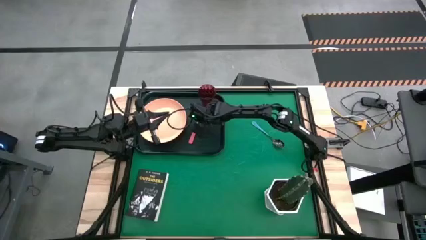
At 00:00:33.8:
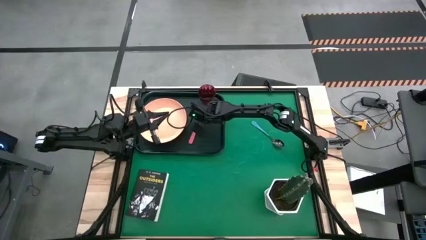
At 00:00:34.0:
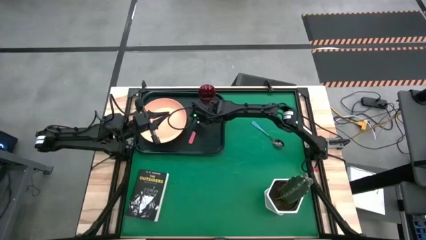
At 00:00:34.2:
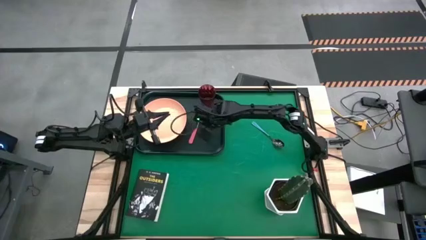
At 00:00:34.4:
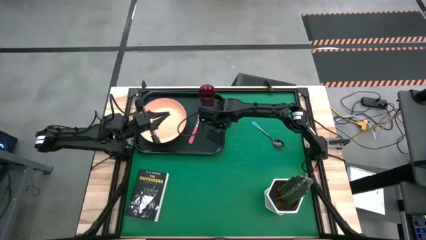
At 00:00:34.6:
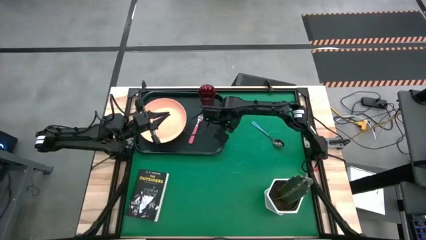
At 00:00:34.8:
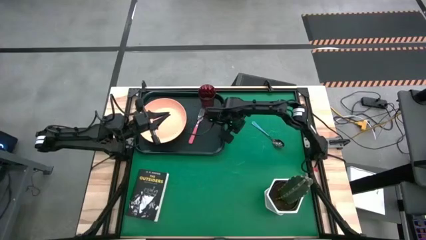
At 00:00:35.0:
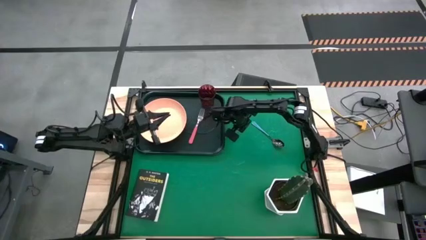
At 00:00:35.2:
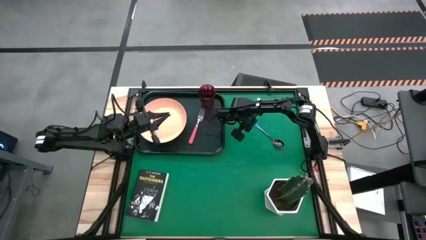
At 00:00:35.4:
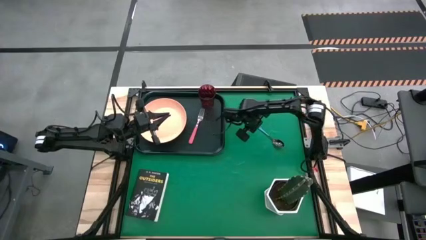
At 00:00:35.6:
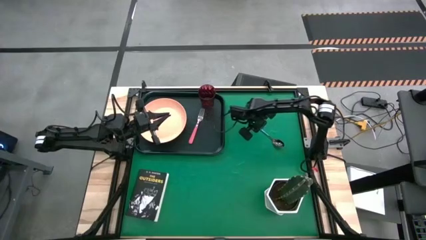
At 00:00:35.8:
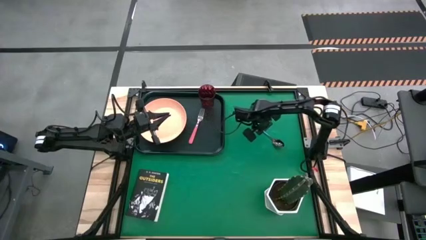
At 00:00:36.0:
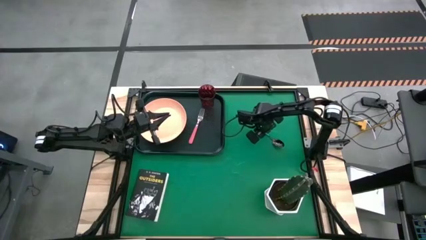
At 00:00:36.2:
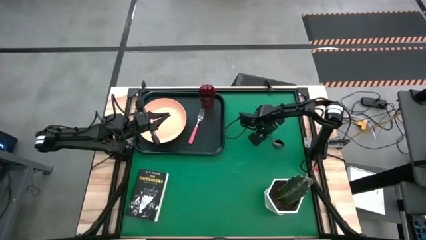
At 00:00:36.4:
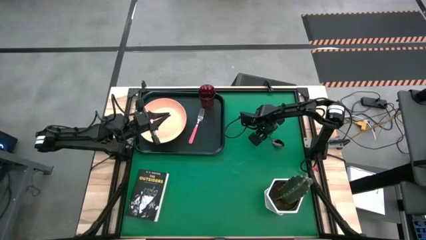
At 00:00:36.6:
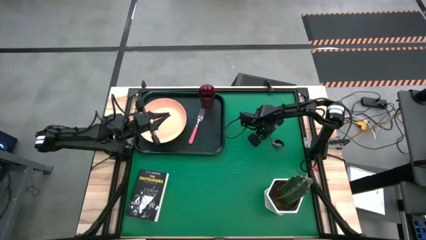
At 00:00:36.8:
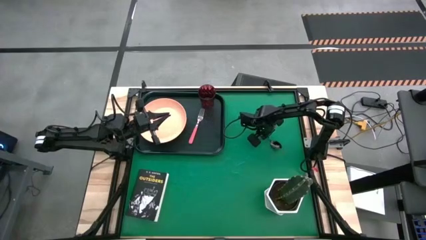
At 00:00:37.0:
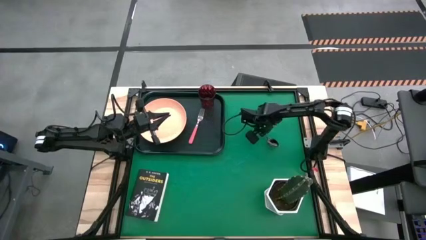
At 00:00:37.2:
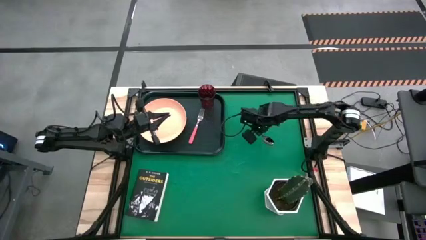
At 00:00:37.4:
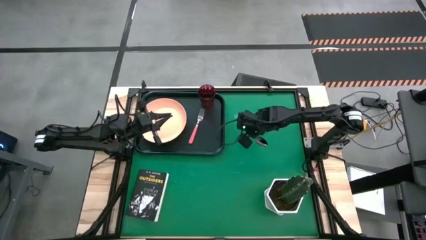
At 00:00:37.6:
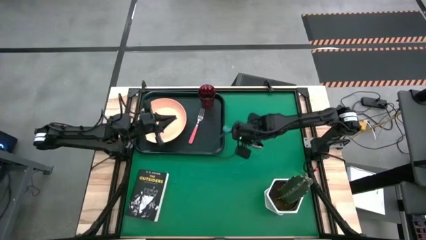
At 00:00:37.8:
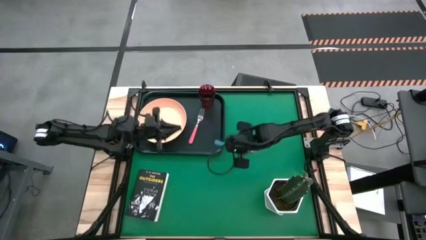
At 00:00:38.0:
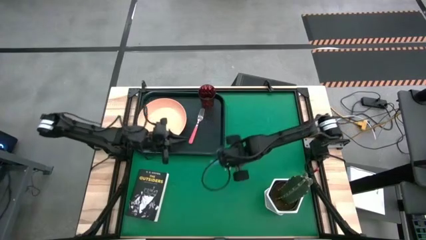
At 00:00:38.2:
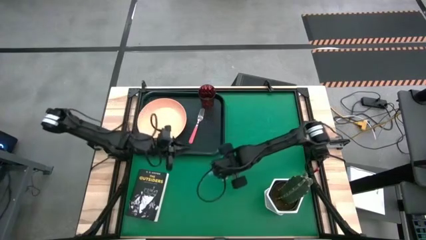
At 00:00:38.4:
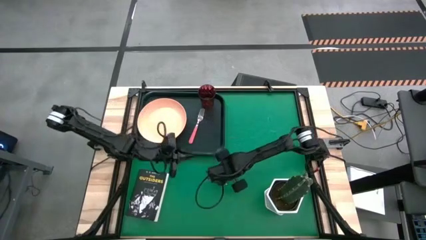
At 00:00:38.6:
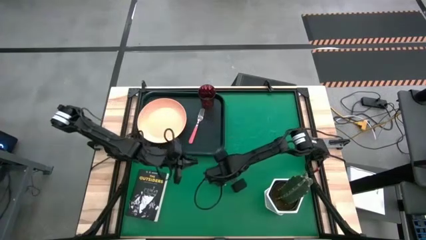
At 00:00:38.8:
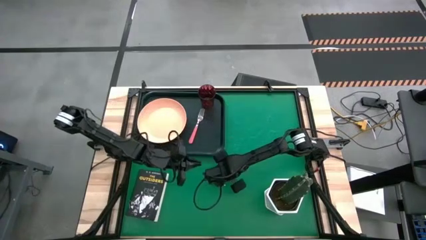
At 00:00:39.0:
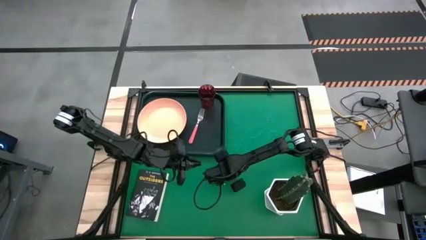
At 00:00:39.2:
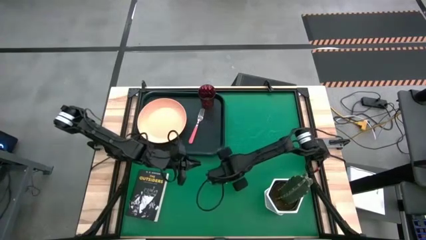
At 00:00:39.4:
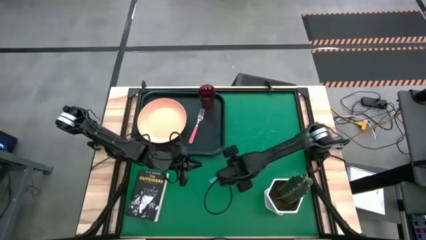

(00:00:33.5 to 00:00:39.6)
Task: Pick and place plate/cup/fork/spoon on tray
Move the blue spoon to the center of the table

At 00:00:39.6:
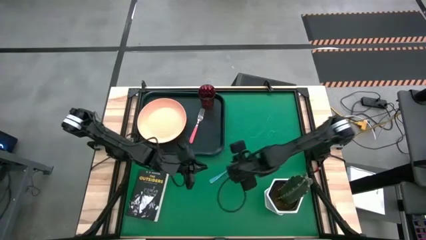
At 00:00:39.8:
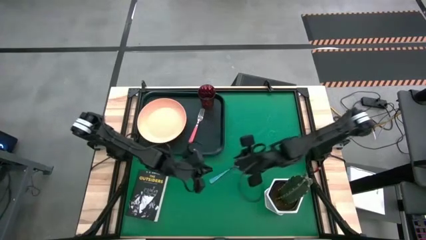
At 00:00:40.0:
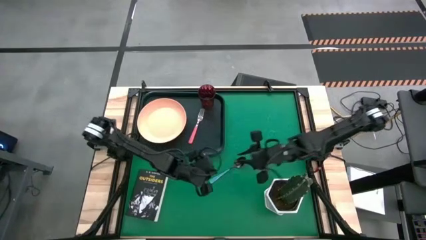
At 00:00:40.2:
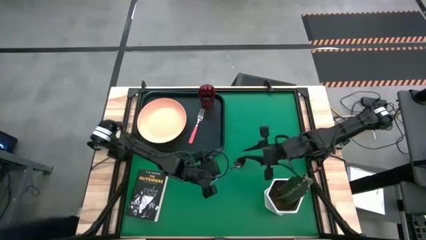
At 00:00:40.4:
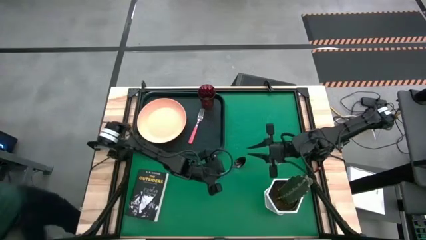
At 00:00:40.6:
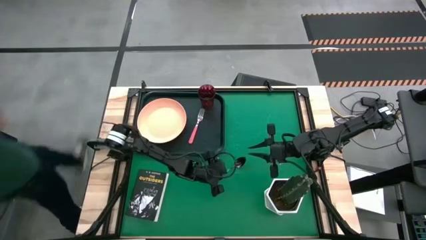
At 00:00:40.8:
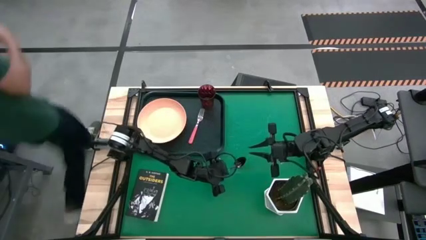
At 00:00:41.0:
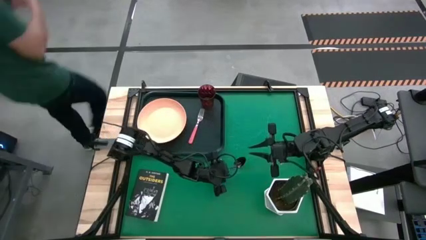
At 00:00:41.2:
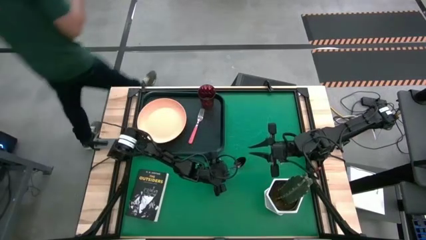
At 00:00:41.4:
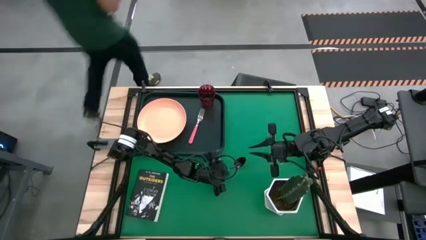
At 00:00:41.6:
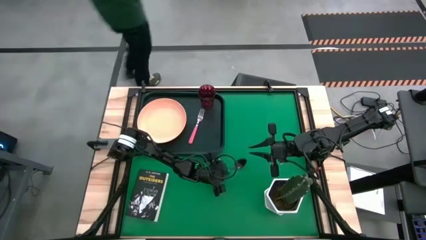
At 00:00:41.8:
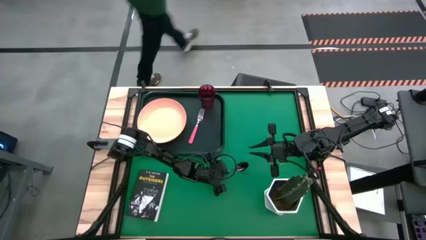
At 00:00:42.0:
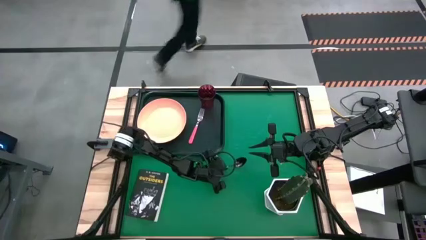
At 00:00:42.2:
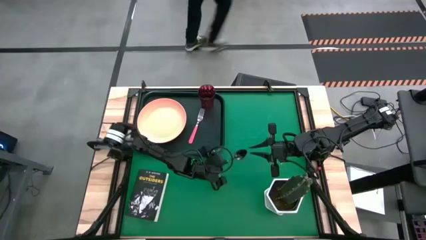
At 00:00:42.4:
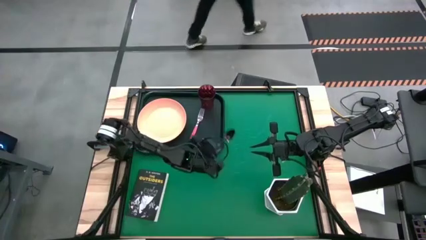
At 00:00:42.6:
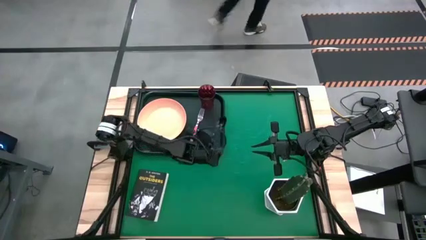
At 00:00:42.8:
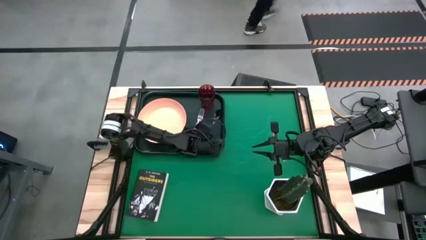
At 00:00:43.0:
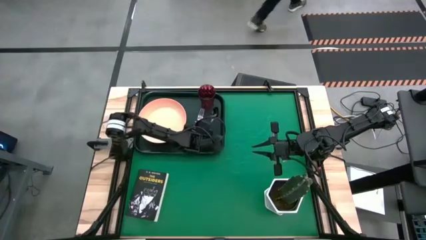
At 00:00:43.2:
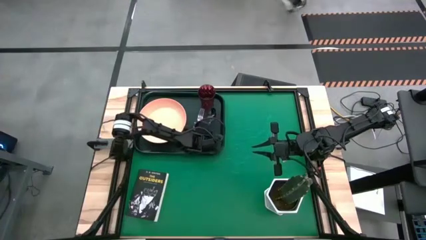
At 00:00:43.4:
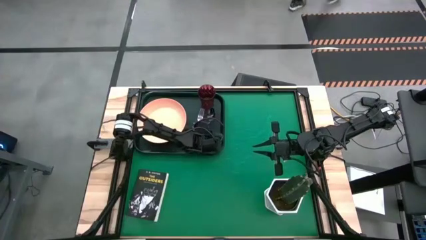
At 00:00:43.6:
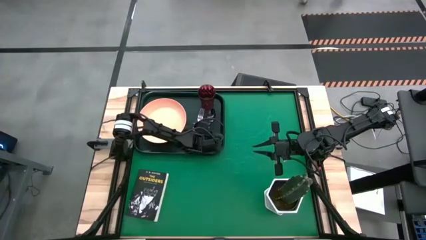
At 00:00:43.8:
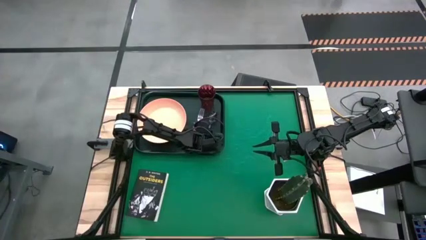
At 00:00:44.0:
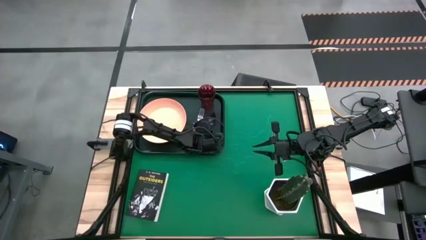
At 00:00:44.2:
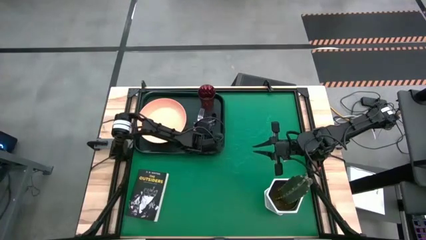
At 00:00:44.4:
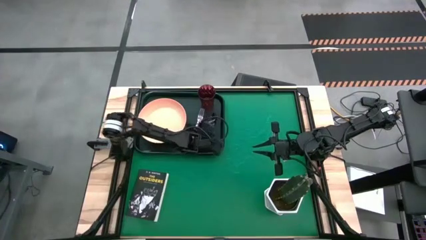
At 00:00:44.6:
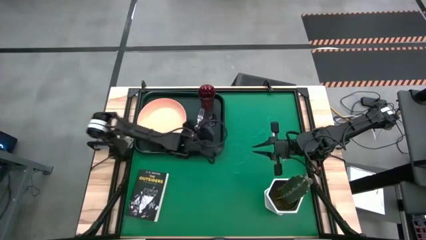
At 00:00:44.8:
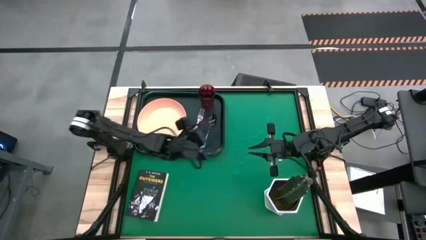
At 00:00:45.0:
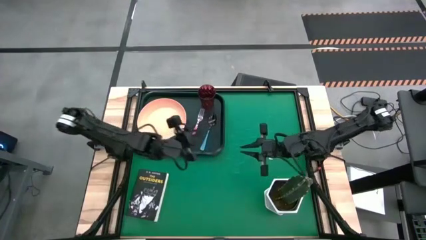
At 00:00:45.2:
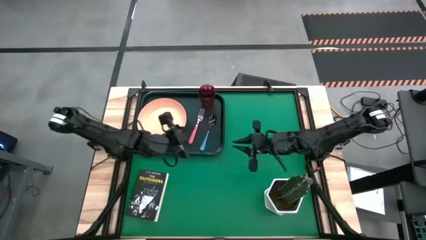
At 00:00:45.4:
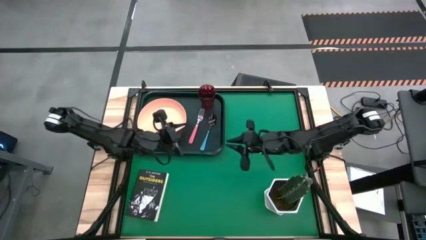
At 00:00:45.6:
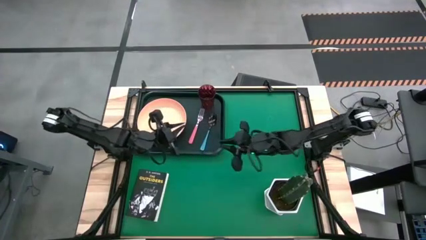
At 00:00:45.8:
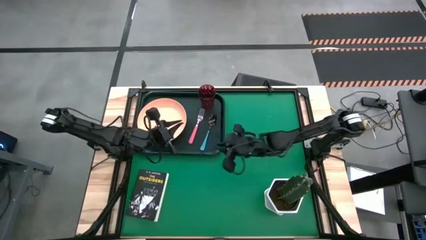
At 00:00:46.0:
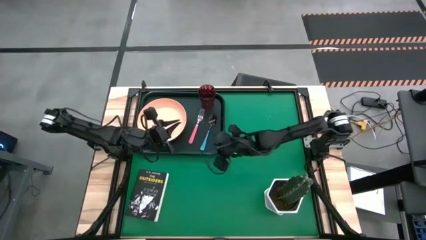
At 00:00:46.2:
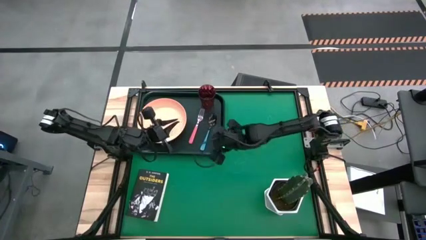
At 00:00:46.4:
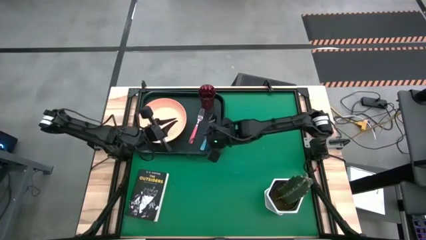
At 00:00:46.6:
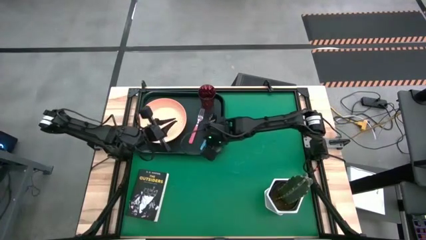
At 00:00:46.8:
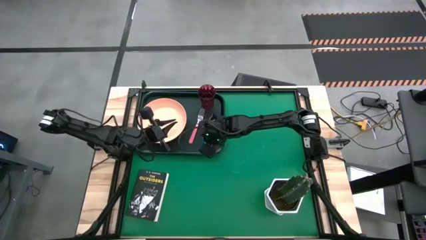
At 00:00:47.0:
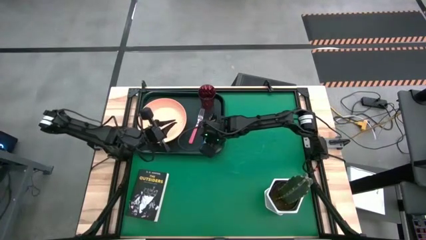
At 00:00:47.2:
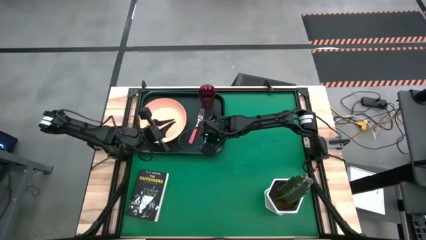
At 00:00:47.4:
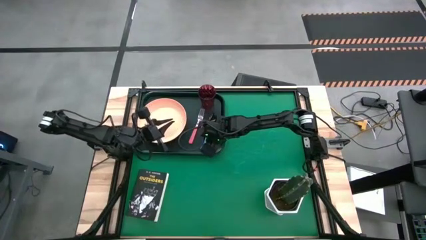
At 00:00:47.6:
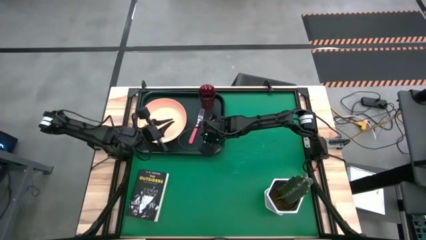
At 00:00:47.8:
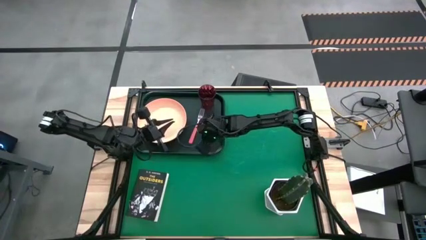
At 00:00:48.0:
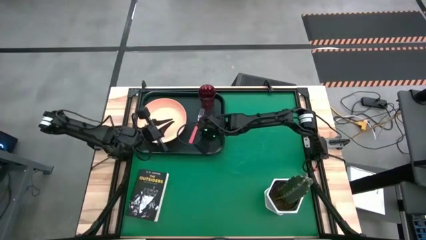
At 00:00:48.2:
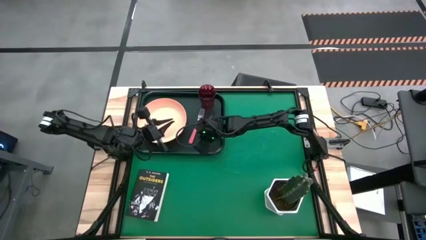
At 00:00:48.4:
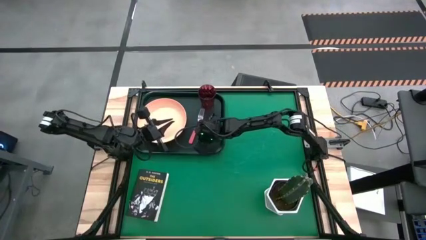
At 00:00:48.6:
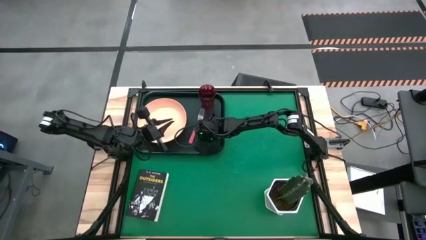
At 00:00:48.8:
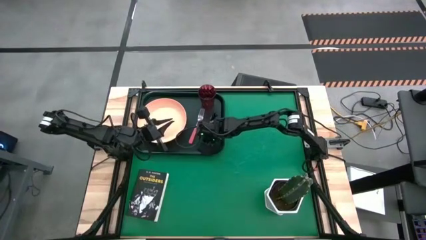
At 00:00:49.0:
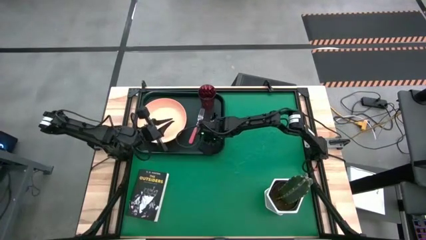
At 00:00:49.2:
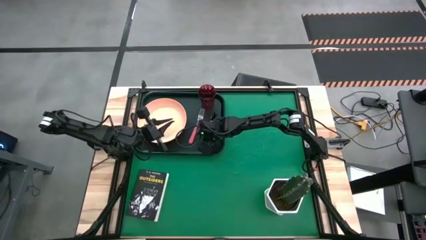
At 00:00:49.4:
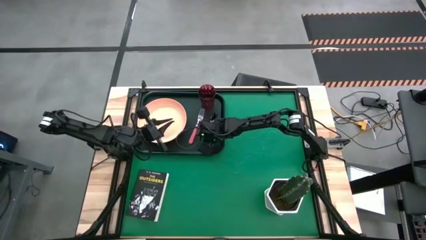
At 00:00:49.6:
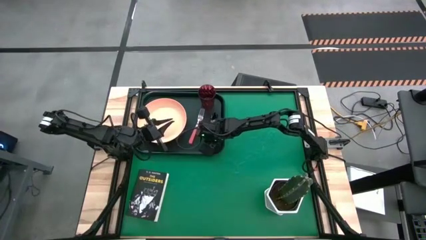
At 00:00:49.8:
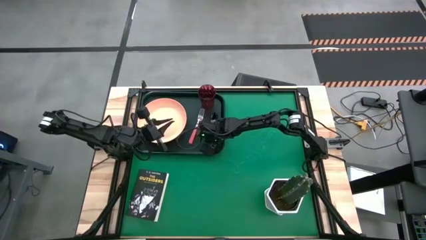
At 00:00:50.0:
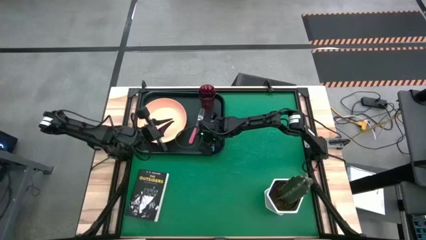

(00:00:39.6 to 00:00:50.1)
Put the blue spoon on the right of the black serving tray aligned with the pink fork
